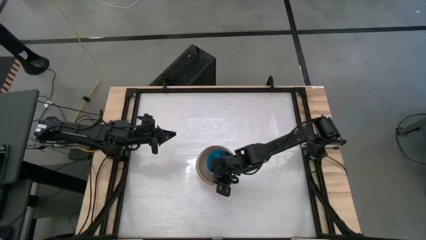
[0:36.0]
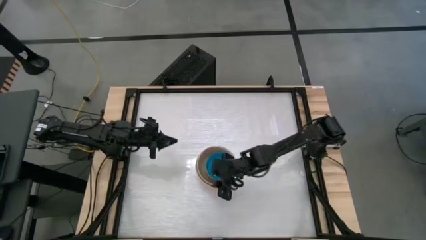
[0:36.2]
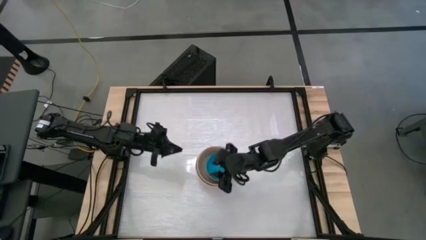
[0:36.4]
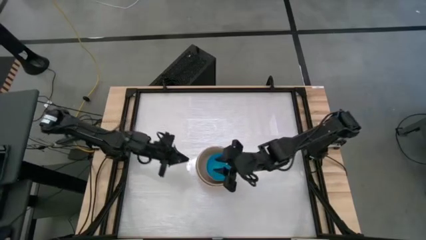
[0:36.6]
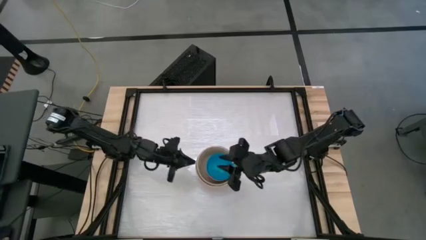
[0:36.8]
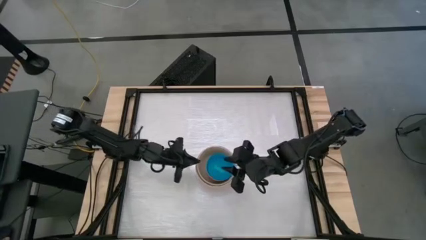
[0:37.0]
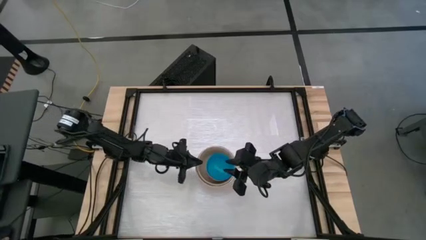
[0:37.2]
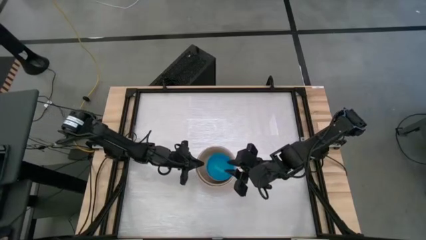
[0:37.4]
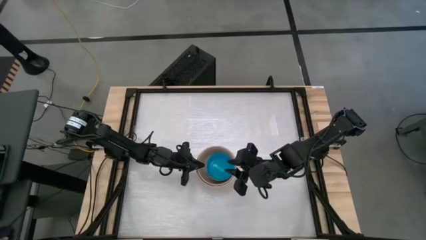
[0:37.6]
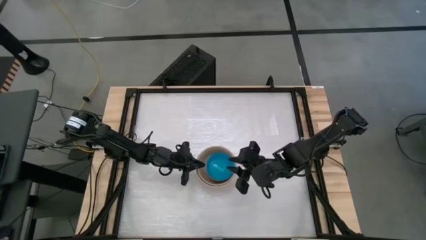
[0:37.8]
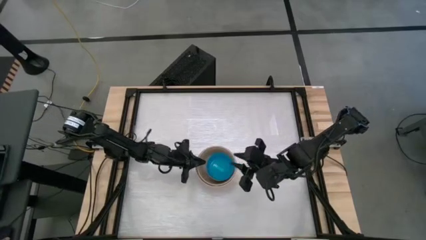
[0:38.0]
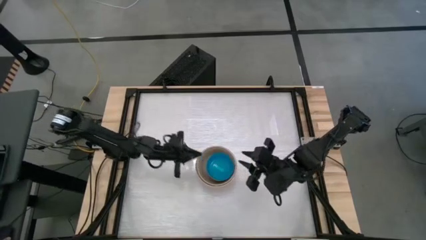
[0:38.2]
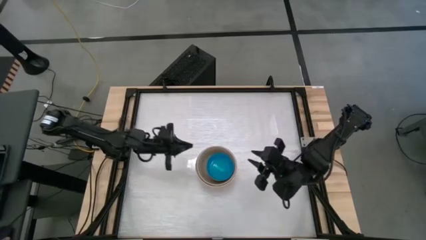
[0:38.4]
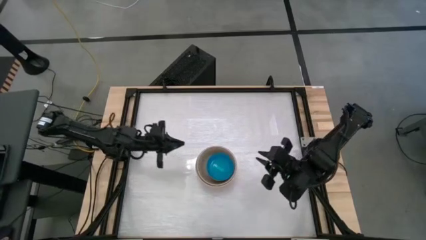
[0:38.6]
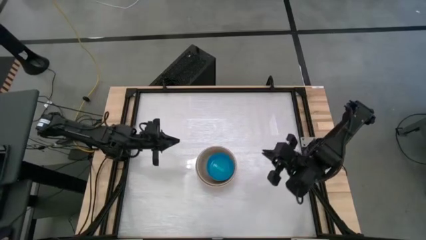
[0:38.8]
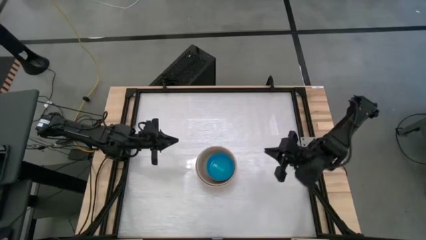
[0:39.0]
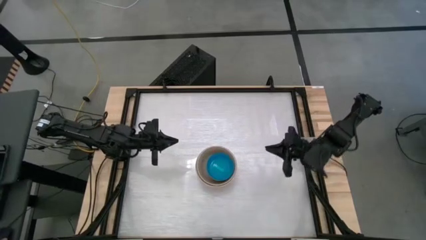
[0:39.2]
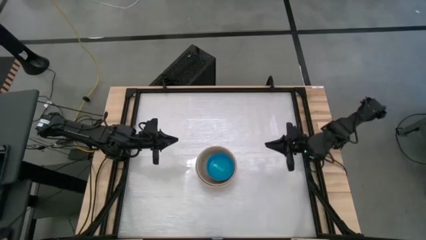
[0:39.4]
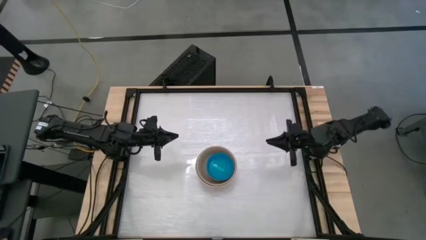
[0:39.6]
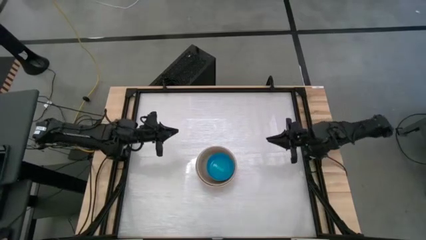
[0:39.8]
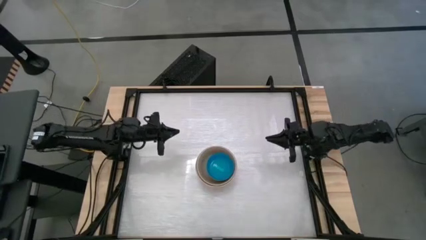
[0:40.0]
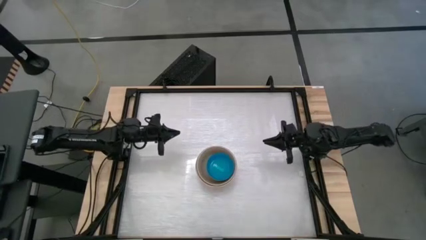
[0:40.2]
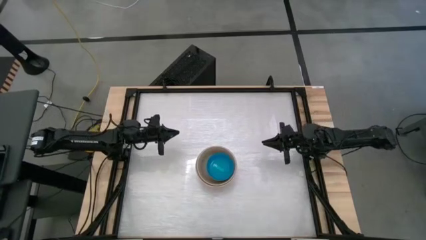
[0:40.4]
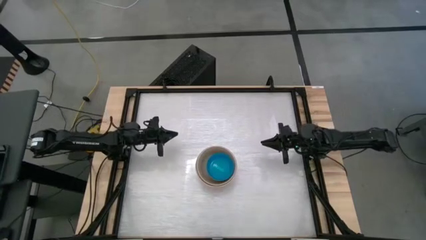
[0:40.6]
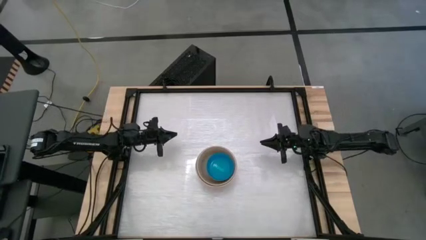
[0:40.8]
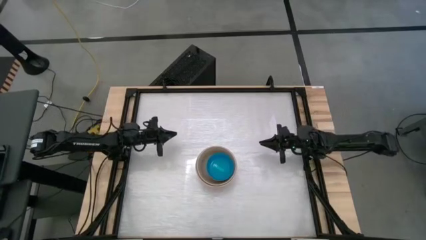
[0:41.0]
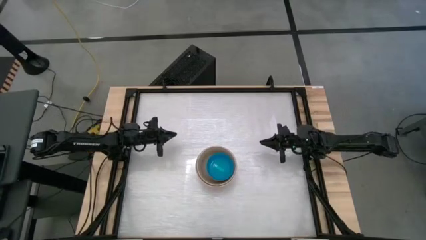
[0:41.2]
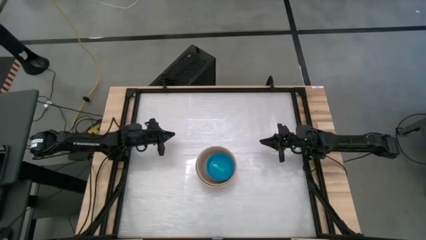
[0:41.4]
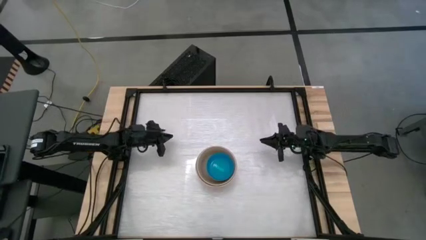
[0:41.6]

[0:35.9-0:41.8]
Return to Home Position

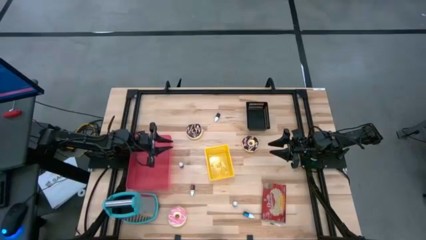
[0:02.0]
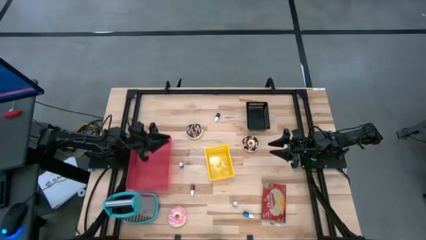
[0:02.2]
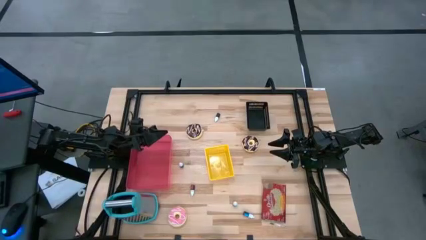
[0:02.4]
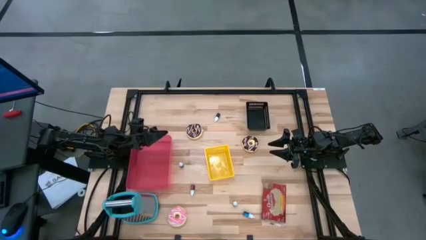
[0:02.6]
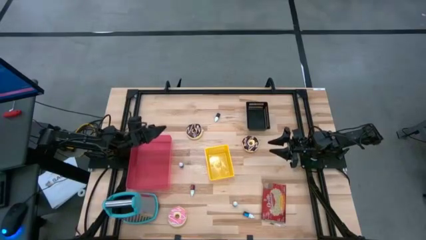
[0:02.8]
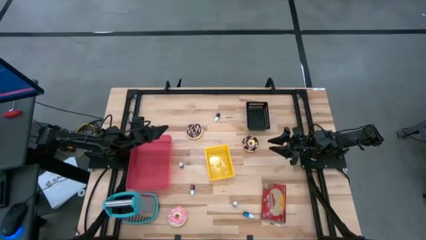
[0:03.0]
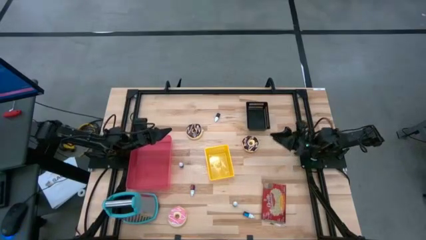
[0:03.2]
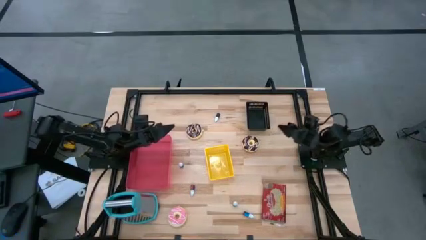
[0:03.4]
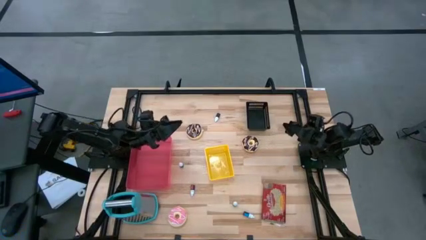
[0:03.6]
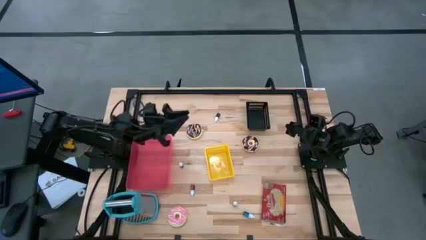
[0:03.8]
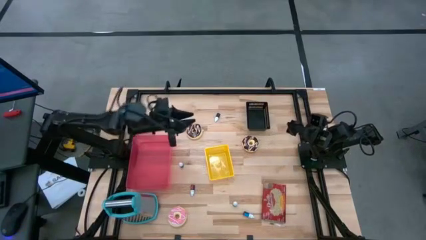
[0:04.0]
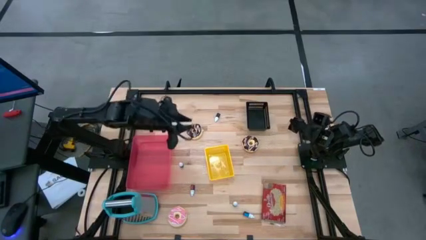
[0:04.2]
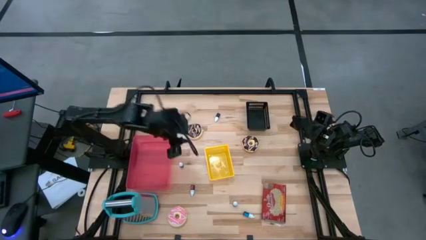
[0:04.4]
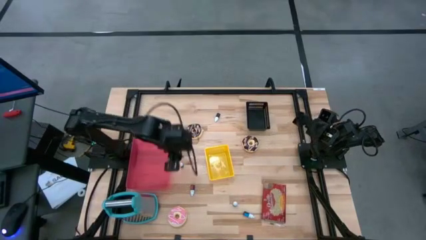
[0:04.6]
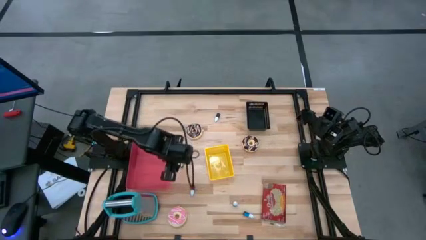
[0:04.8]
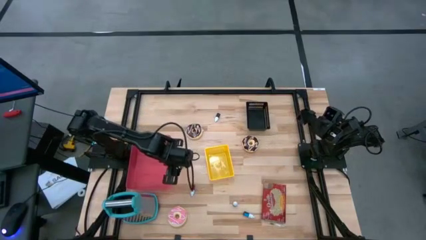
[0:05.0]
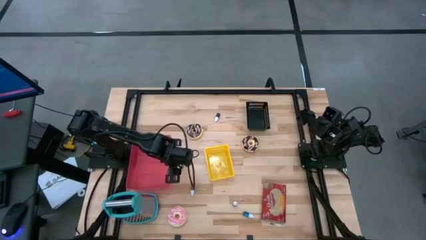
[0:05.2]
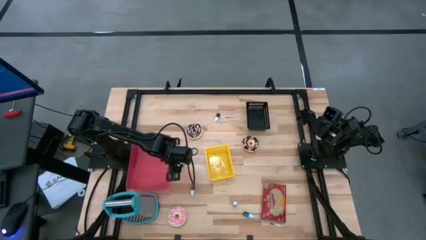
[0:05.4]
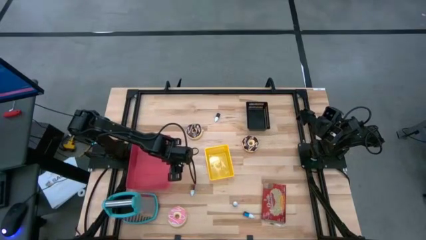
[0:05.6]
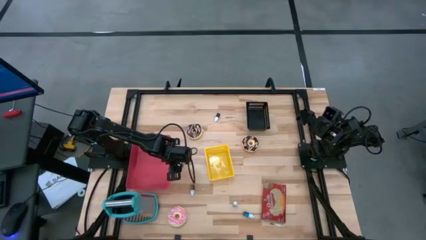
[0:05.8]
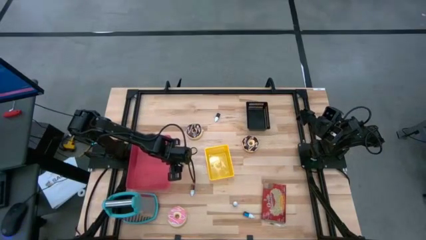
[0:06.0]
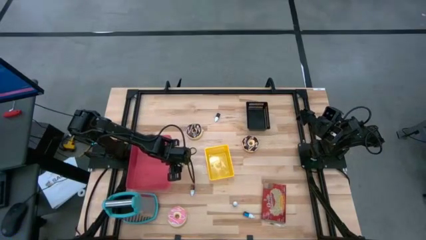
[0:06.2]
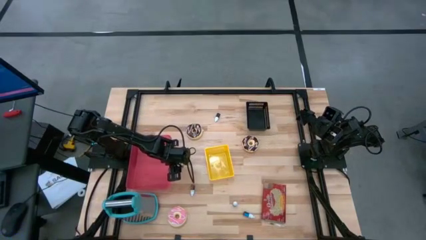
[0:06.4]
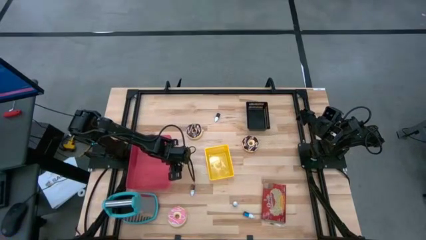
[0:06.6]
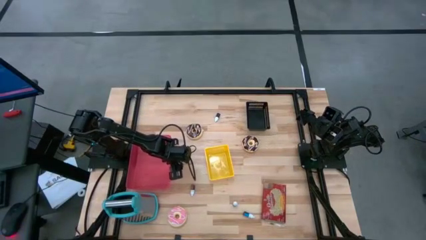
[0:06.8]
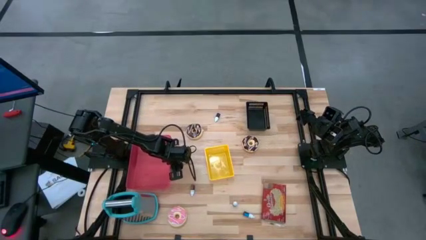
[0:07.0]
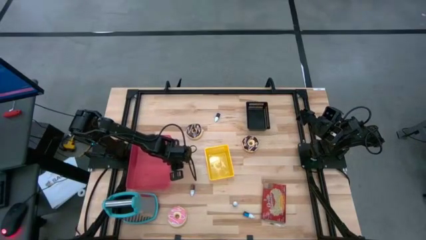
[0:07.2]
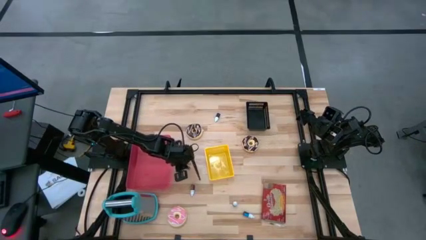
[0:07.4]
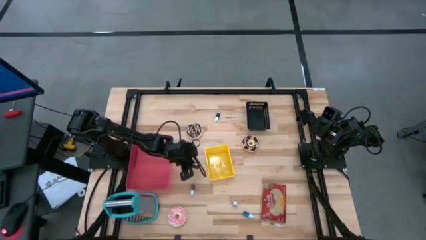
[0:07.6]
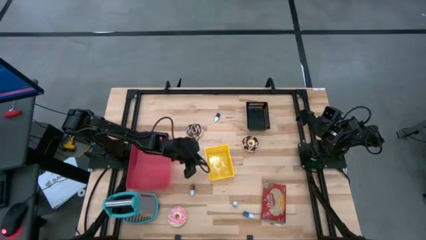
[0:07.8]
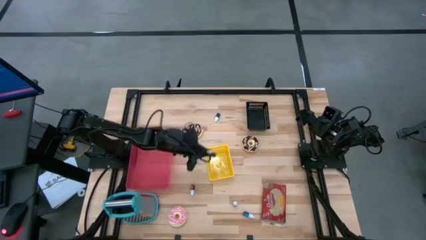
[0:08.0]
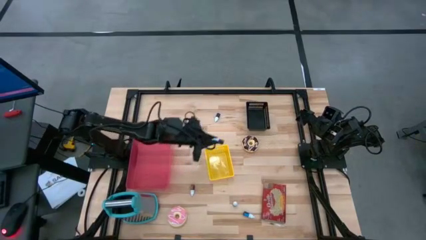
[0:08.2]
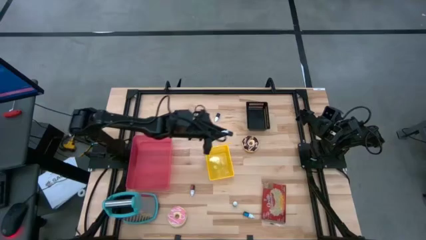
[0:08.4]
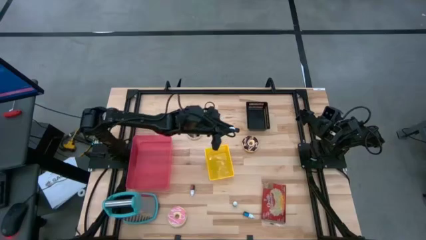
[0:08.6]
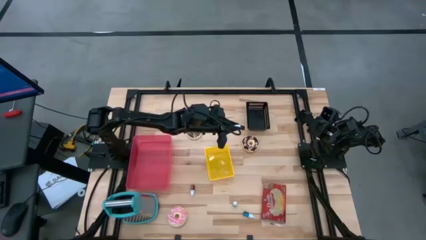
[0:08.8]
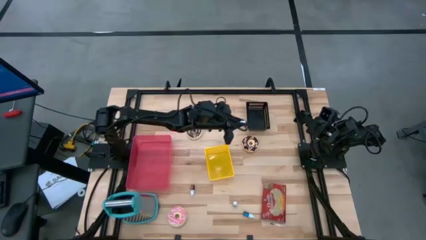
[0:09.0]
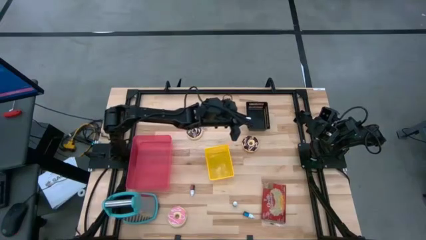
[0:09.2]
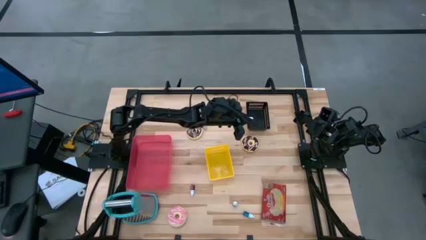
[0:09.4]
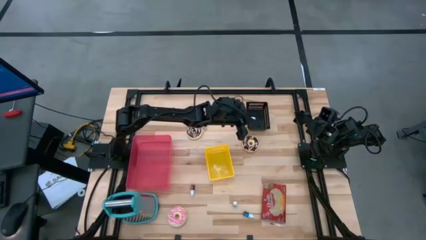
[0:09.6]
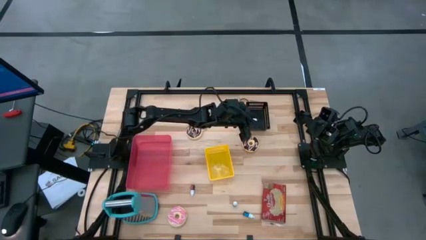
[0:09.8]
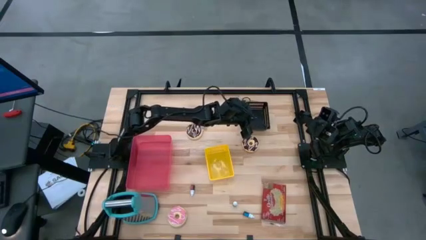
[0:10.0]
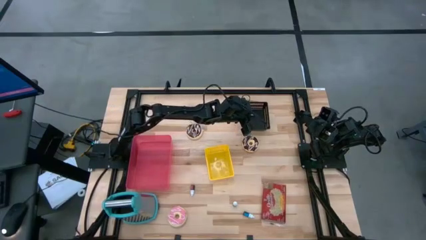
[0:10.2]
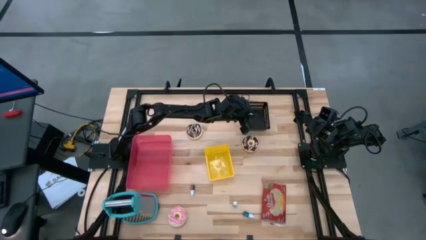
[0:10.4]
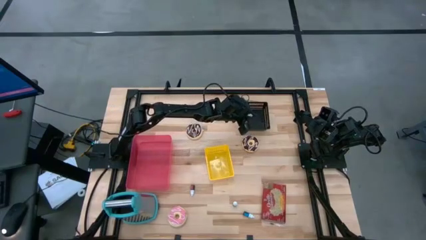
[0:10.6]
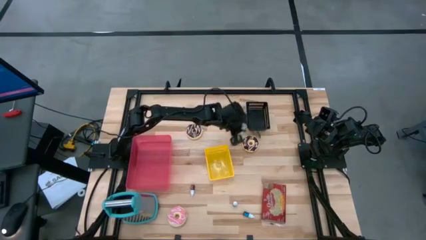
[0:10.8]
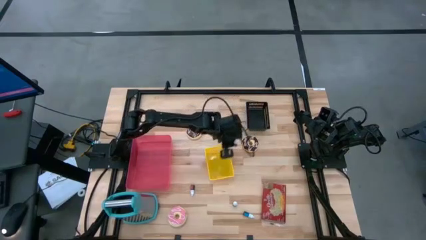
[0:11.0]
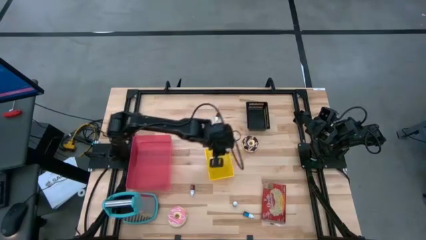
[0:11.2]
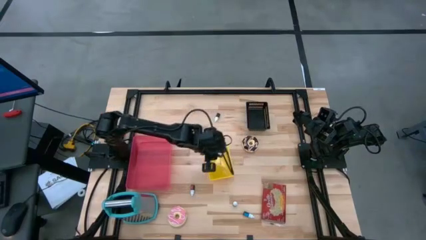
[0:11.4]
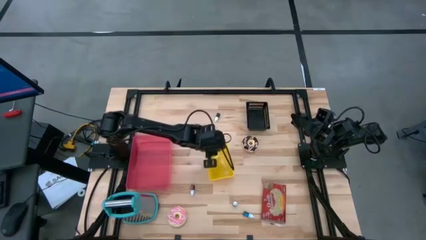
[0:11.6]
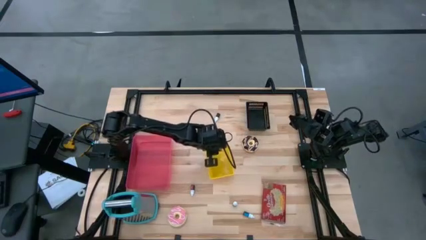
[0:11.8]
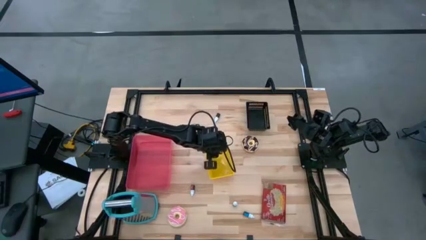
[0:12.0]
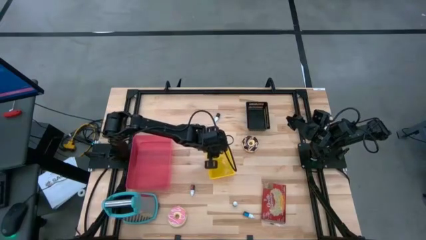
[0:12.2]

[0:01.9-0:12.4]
Put the top red food coloring bottle into the yellow bin
